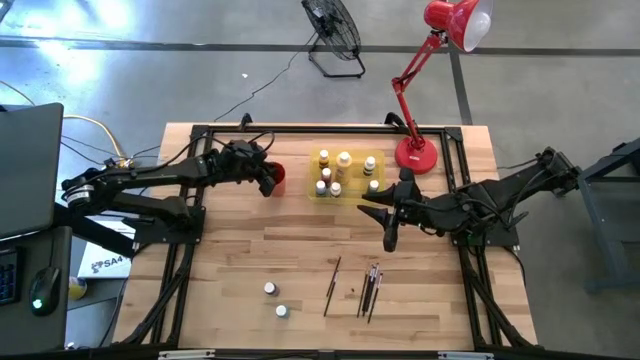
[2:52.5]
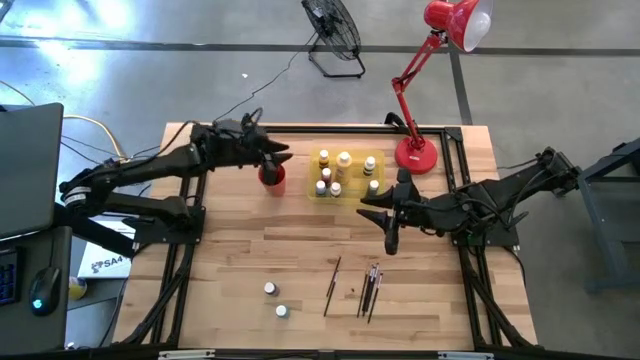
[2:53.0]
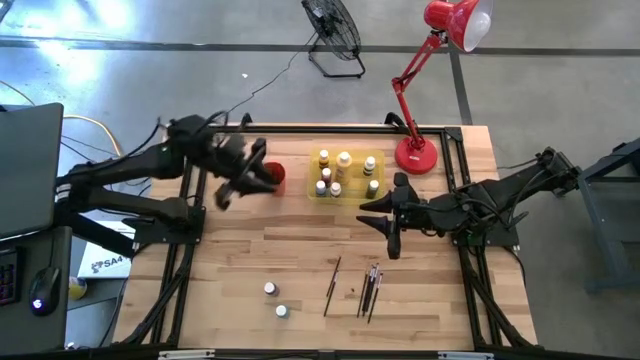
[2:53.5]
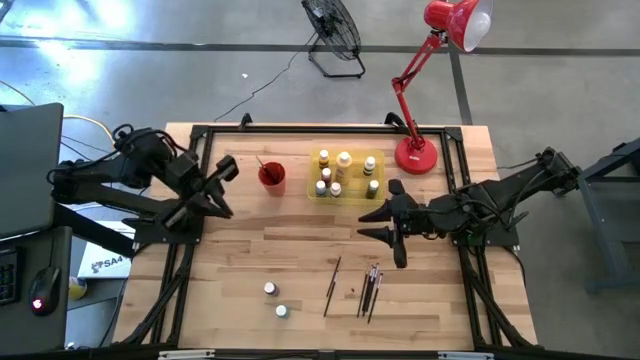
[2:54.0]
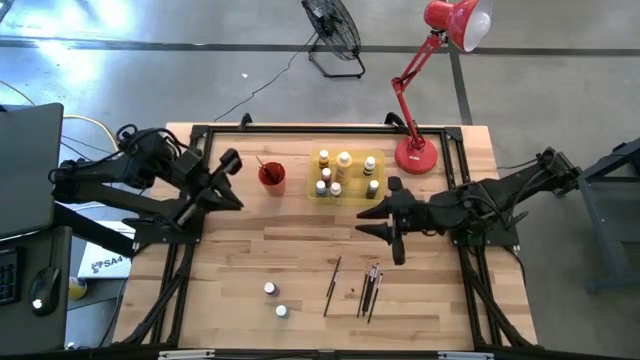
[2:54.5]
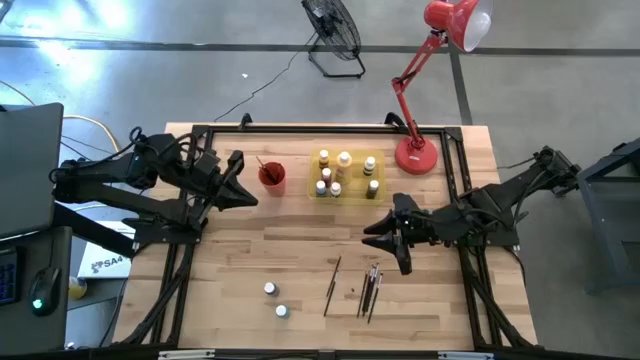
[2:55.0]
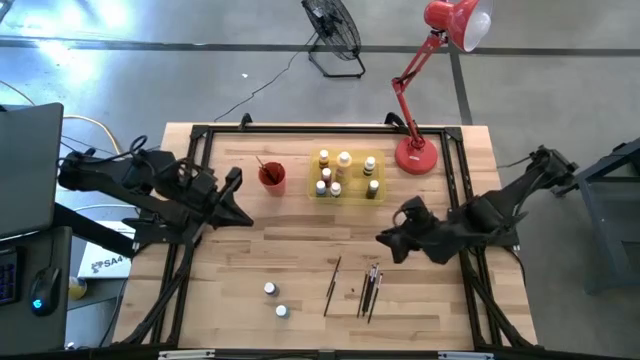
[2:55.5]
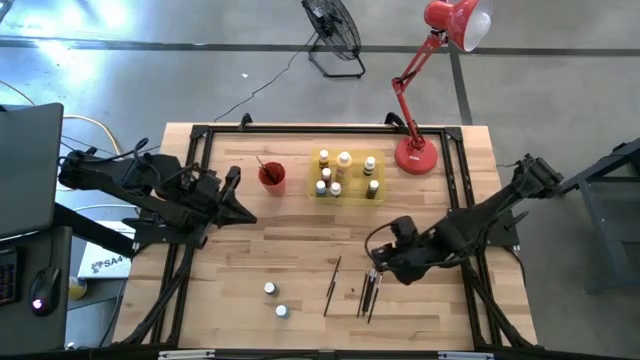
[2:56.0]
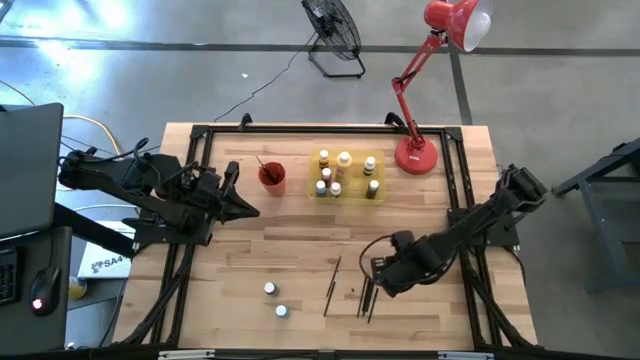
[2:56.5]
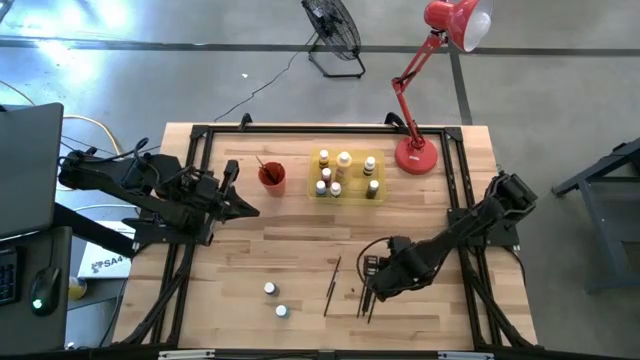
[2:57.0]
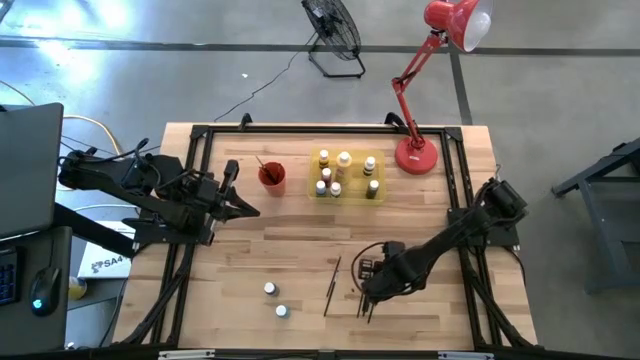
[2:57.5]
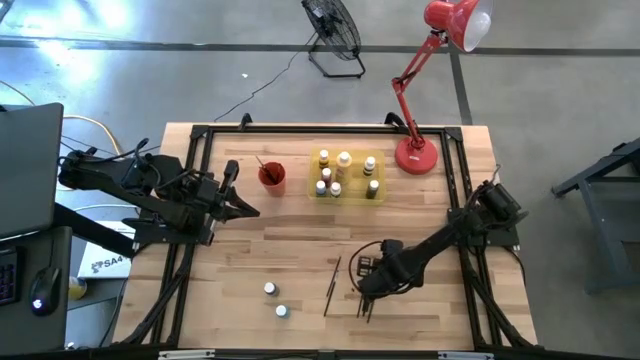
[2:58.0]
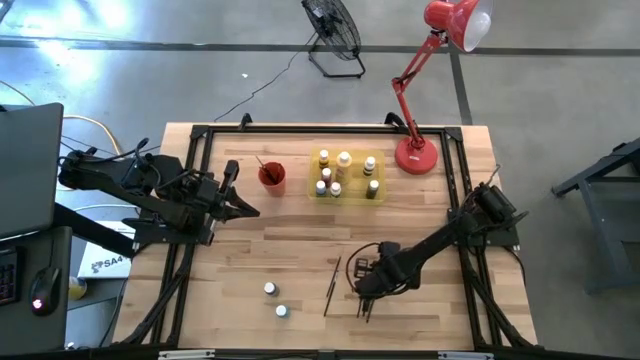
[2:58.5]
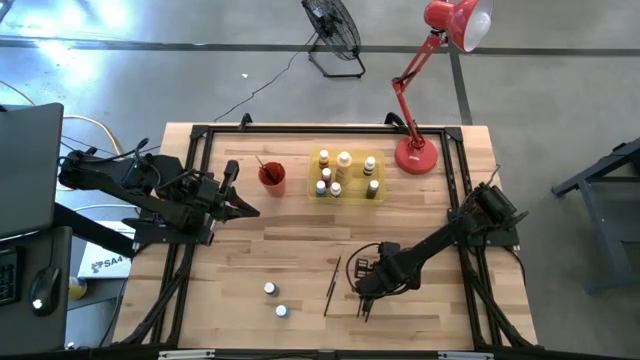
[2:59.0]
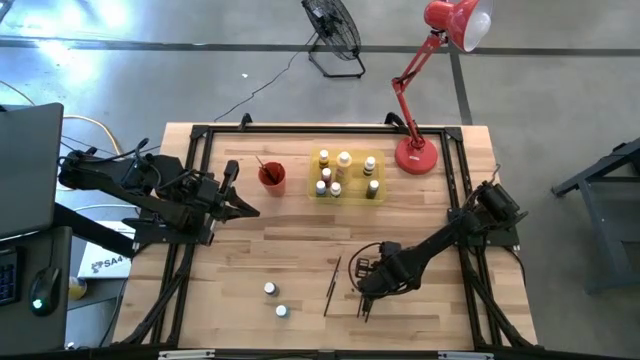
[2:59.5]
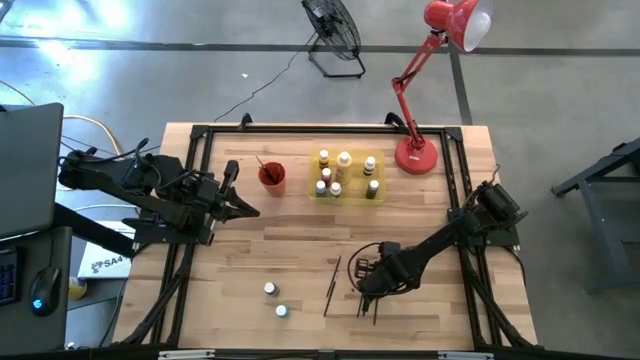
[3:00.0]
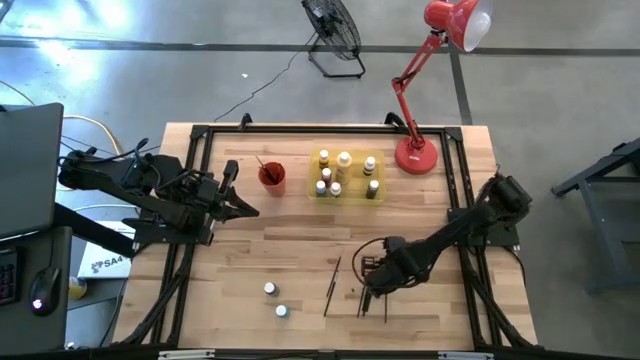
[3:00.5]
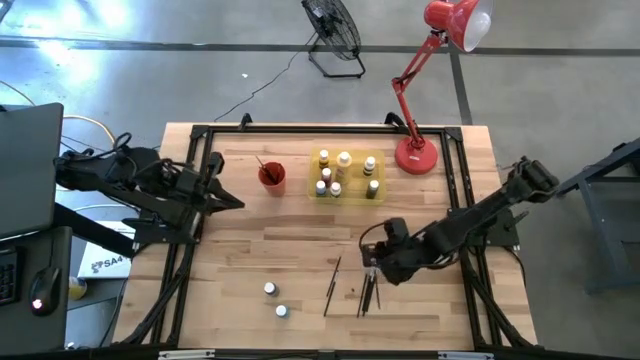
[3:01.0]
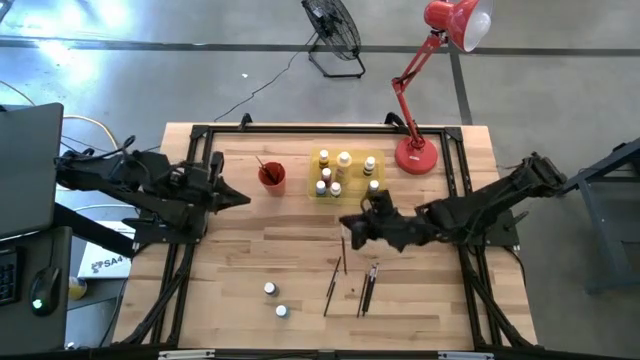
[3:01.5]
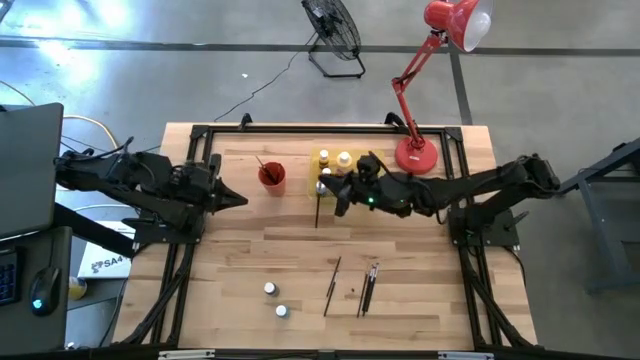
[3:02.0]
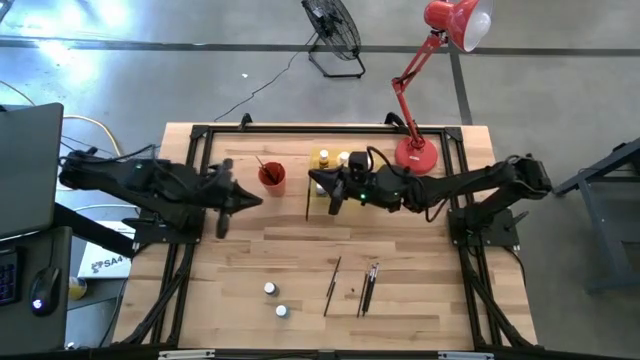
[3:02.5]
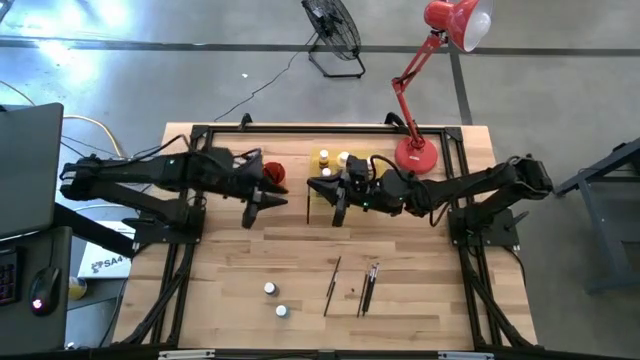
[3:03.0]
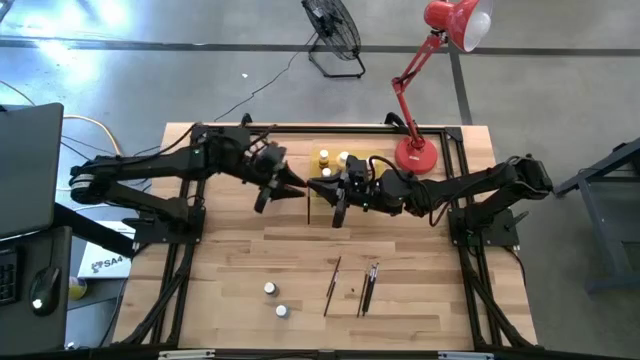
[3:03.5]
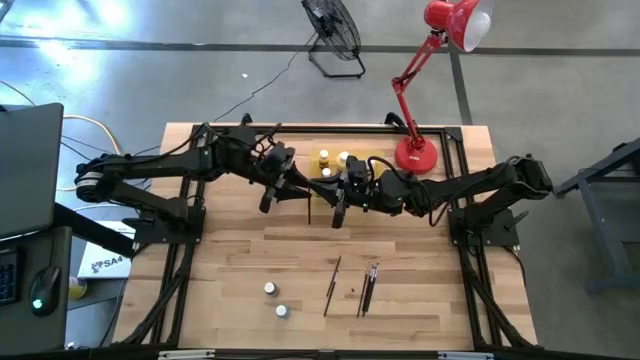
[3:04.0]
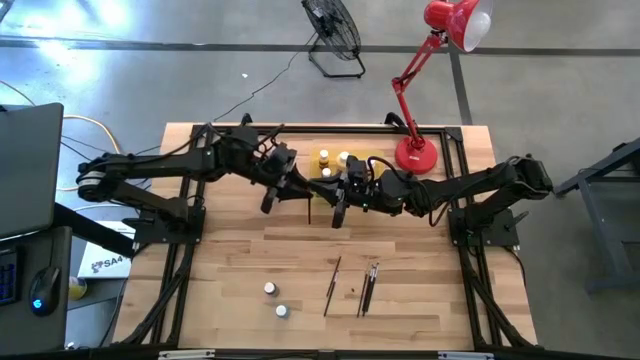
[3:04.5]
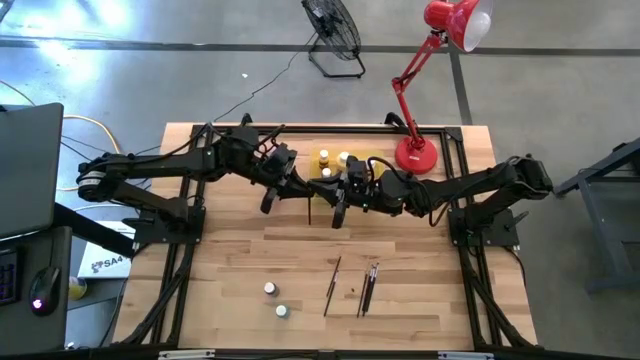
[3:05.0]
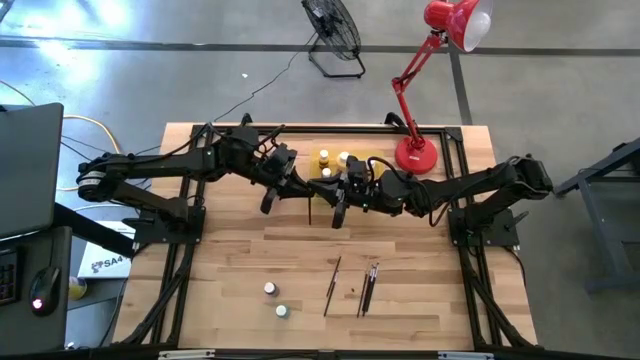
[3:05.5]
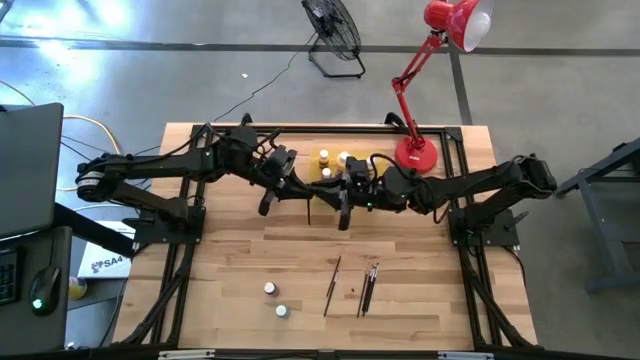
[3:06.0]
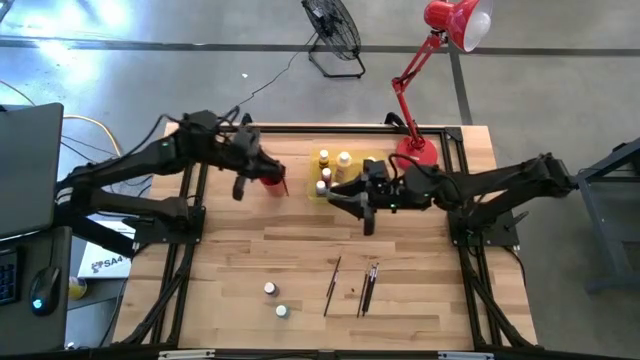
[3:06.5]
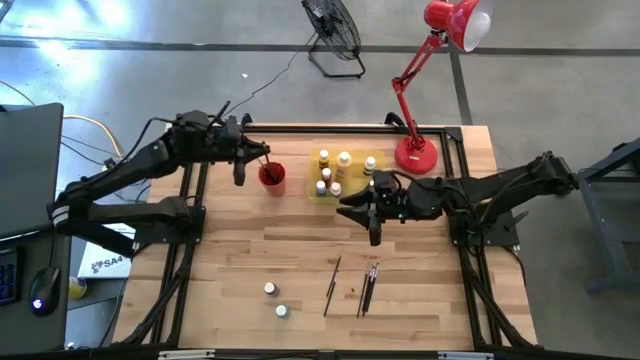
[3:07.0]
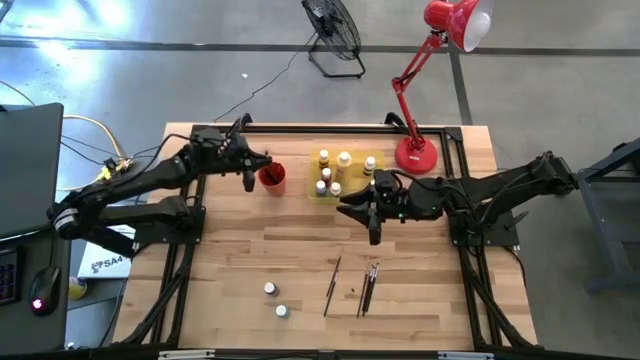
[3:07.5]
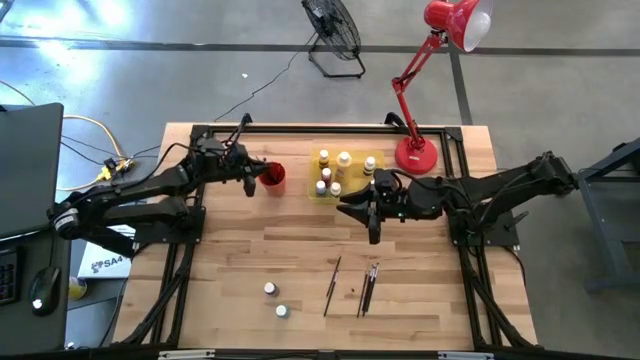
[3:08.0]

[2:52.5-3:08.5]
Task: Pick & Place Paint Supplies
Put the silver paintbrush into the orange cup

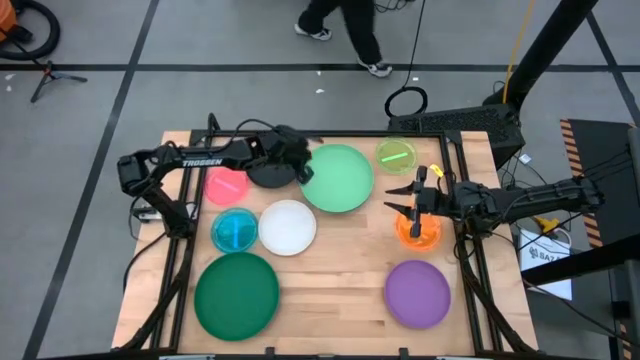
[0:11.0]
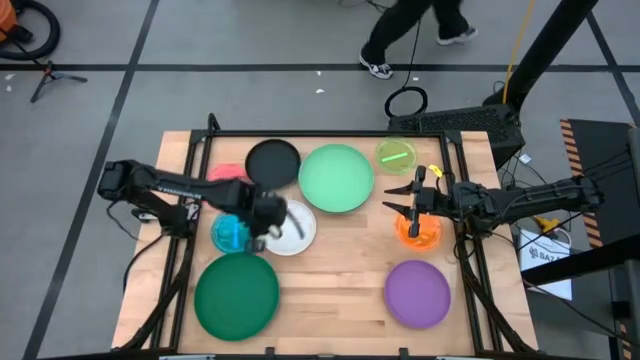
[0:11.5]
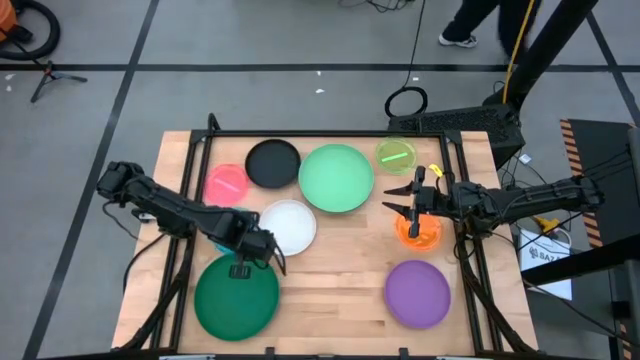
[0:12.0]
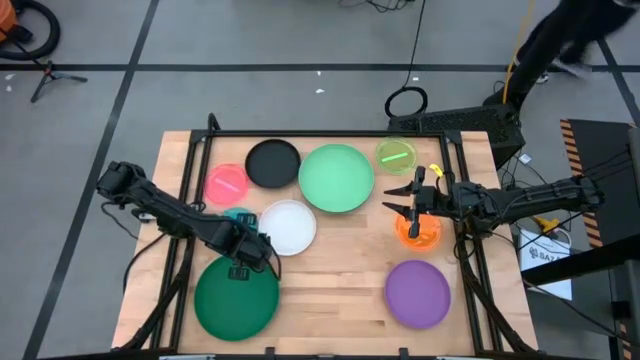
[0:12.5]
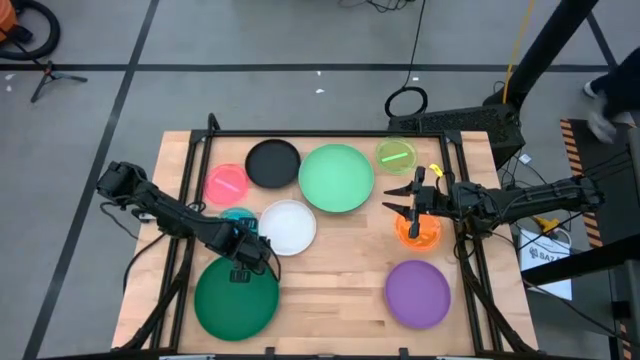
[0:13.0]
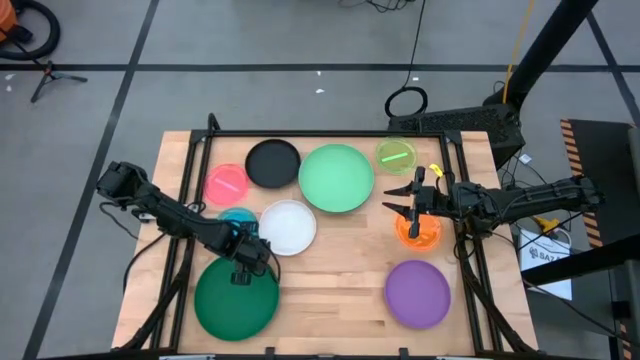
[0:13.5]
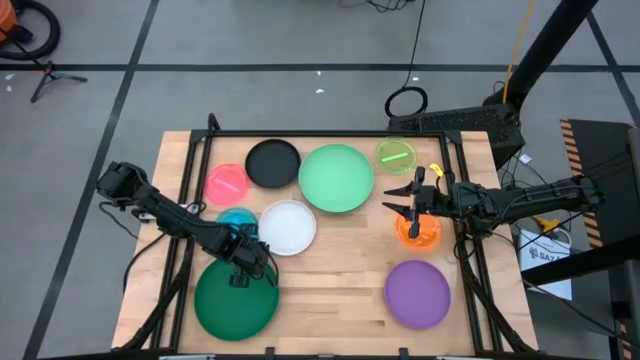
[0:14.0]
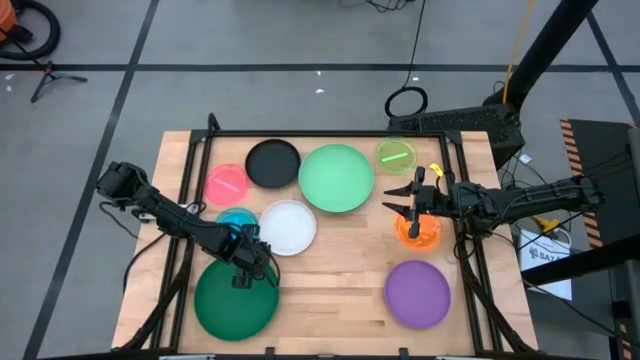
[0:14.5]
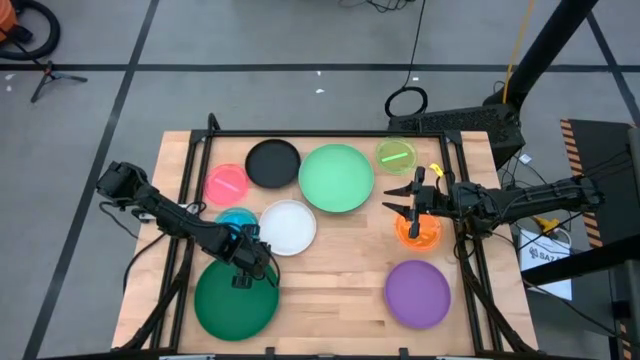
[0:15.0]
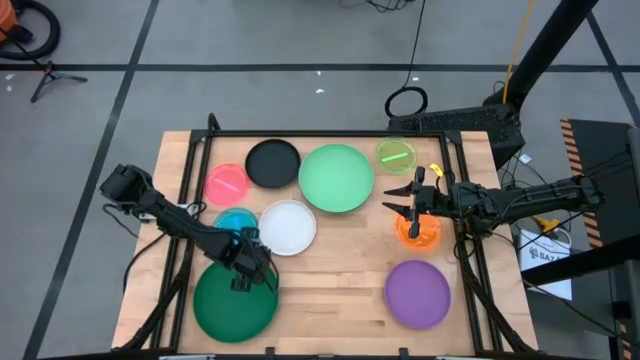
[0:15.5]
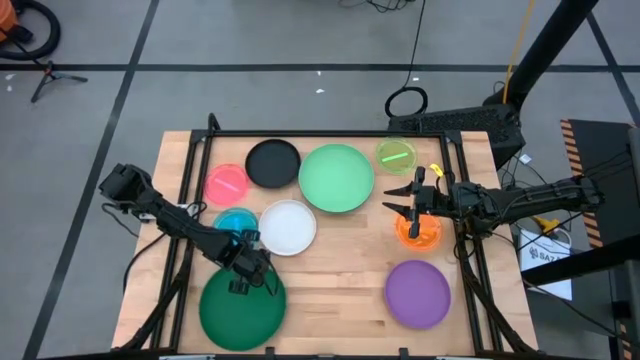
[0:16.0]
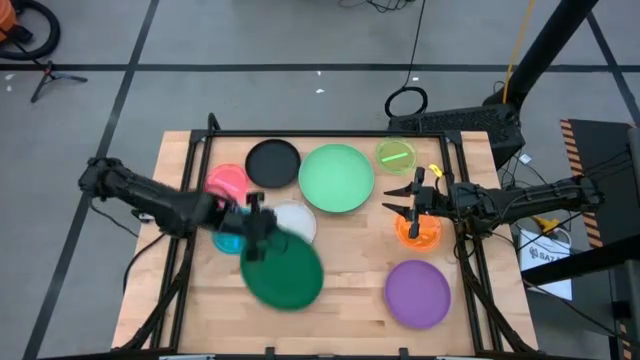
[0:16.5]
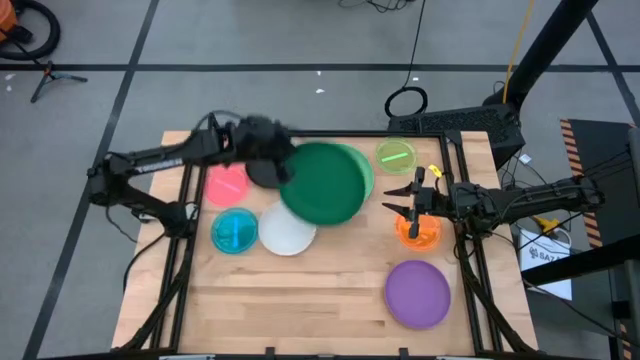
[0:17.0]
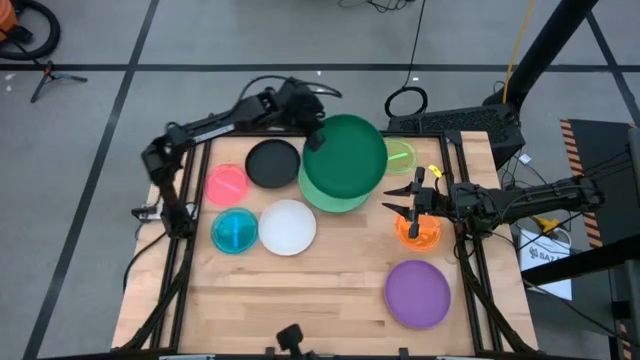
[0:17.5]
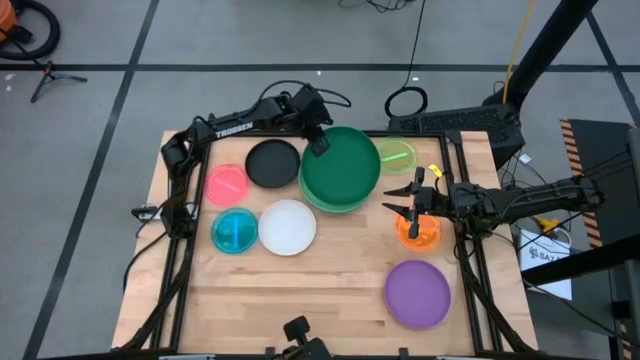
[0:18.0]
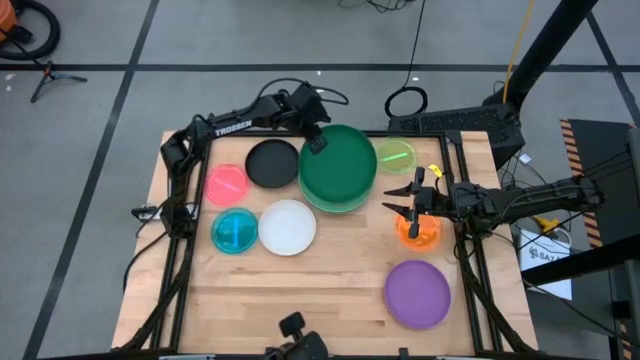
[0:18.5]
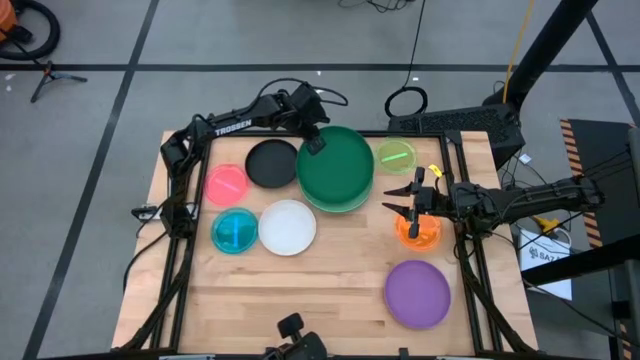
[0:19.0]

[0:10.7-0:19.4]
Task: Stack plastic plates
Stack the green plate on top of the light green plate
